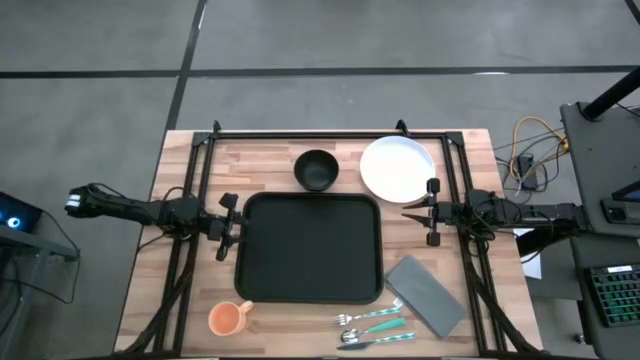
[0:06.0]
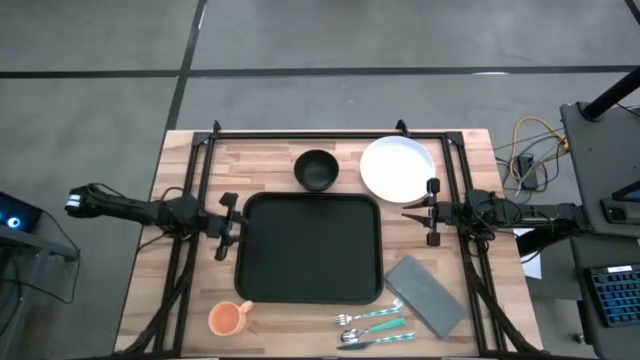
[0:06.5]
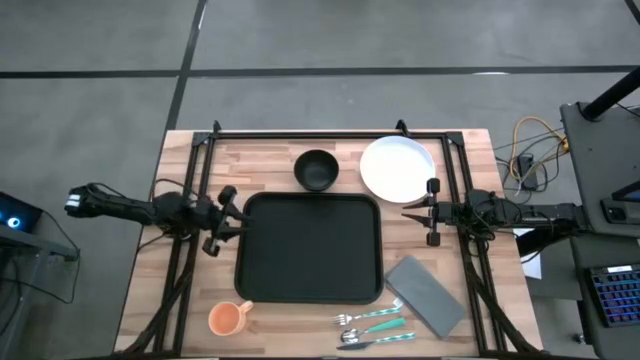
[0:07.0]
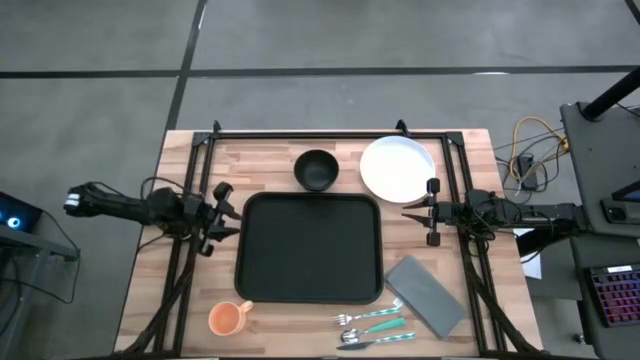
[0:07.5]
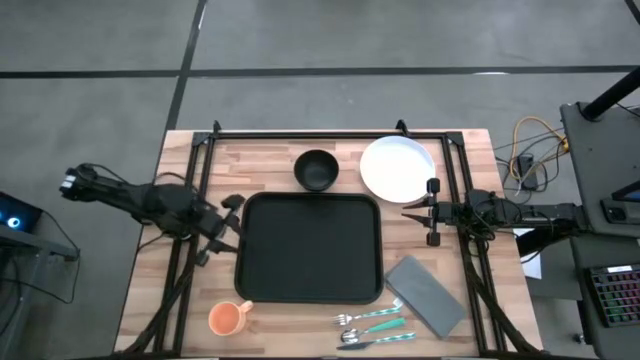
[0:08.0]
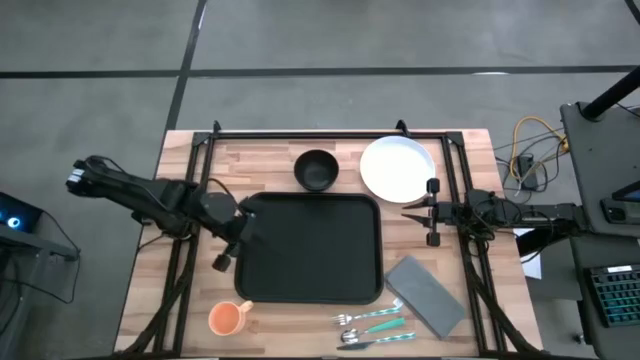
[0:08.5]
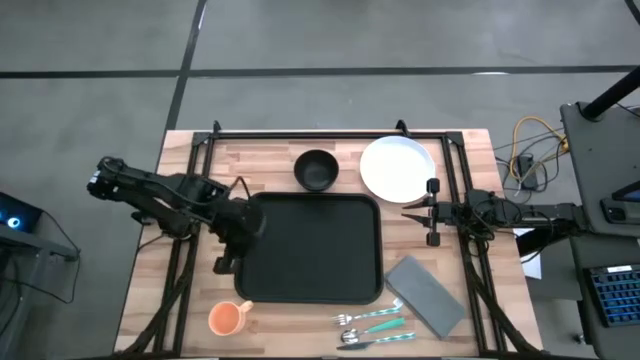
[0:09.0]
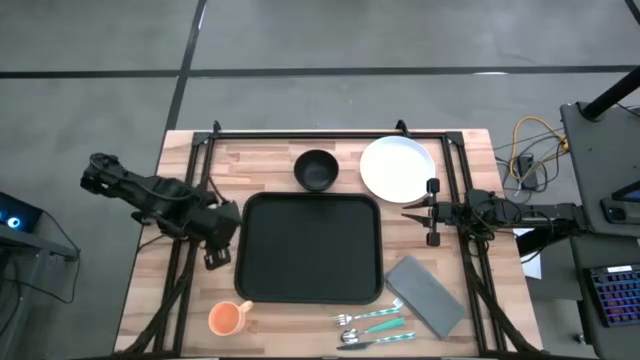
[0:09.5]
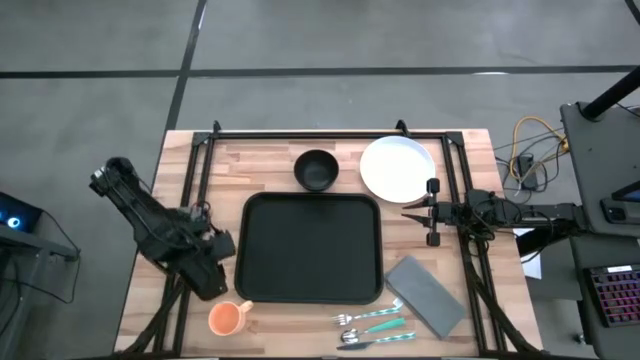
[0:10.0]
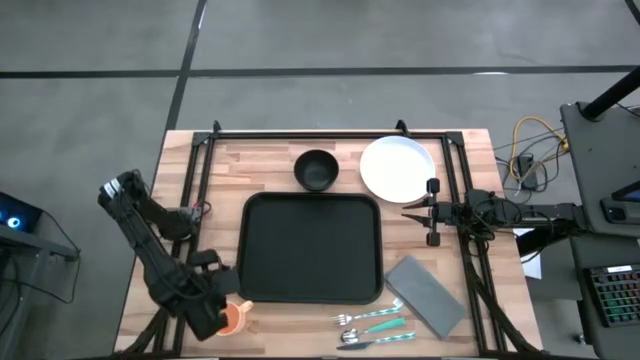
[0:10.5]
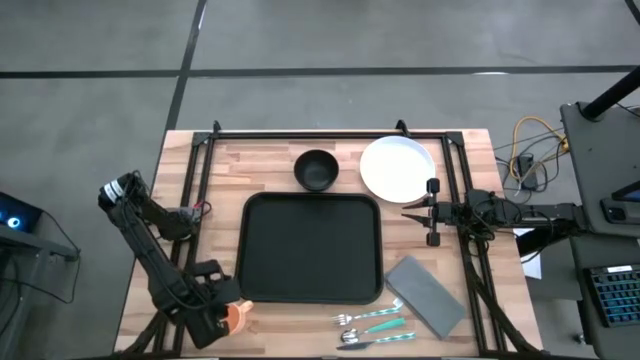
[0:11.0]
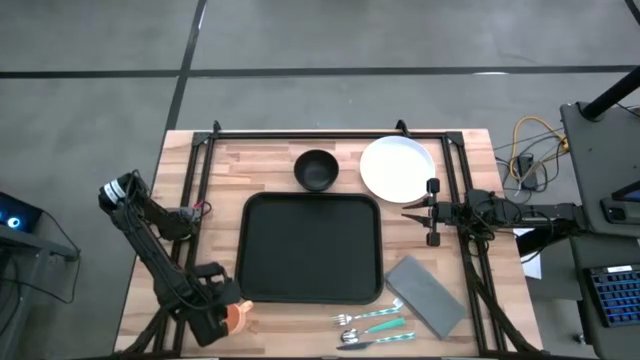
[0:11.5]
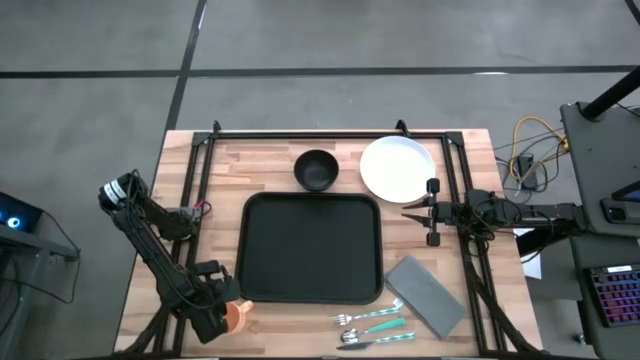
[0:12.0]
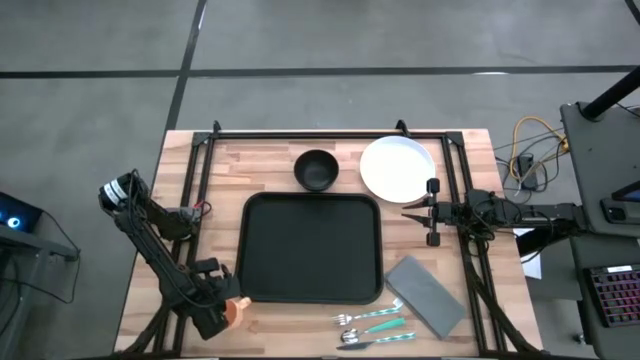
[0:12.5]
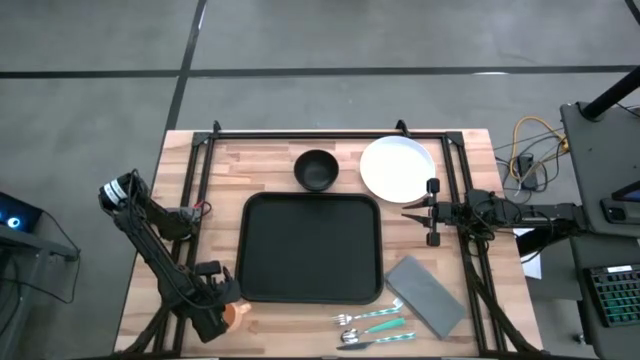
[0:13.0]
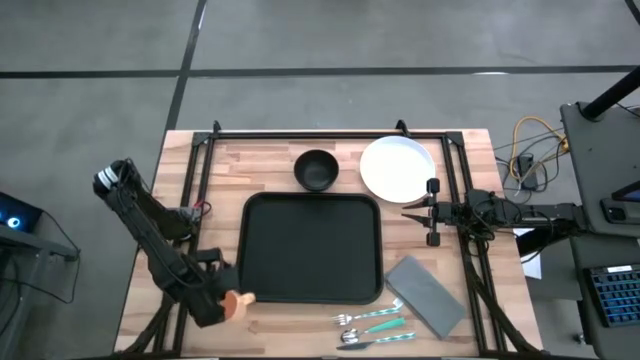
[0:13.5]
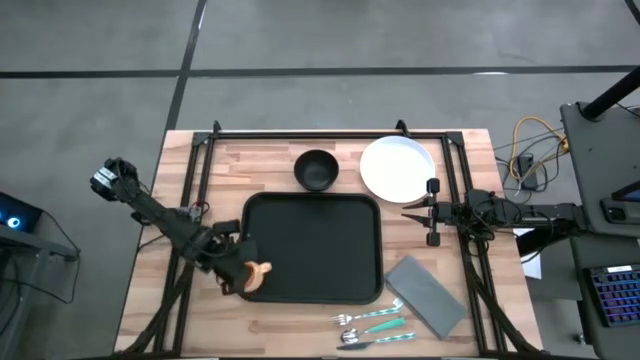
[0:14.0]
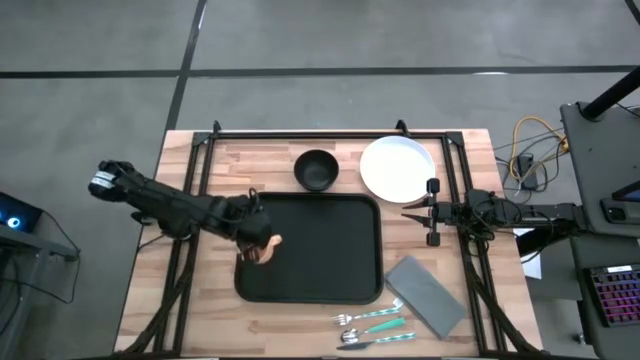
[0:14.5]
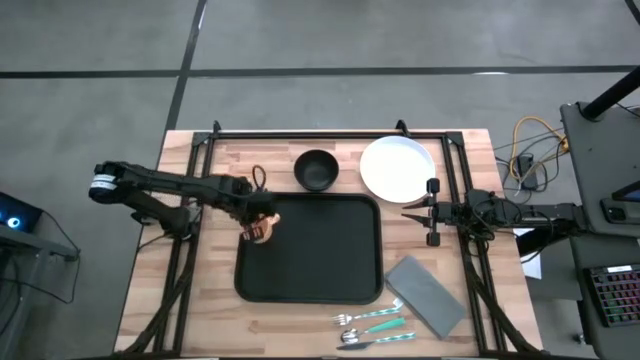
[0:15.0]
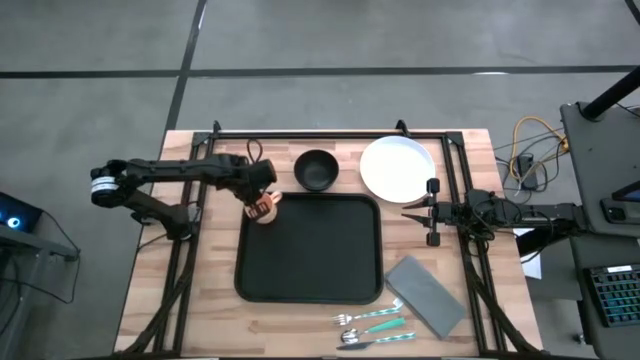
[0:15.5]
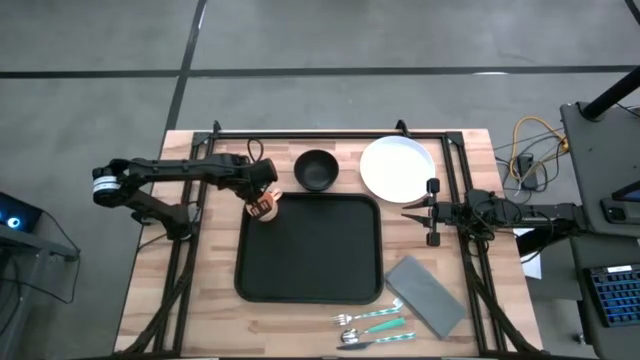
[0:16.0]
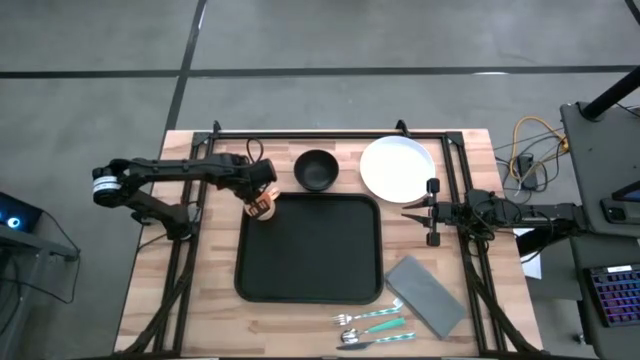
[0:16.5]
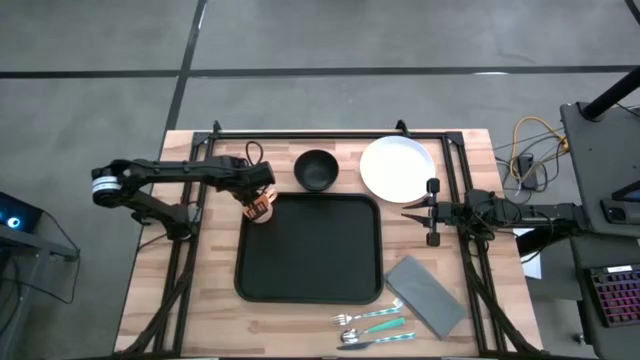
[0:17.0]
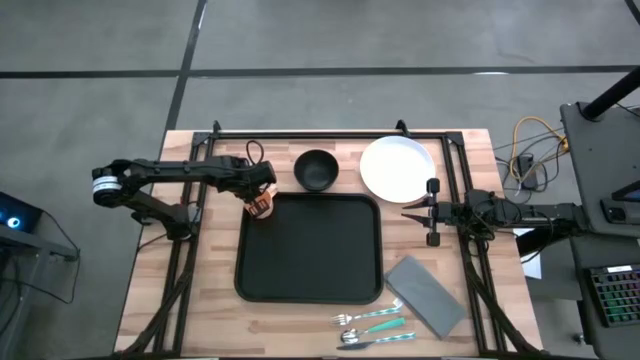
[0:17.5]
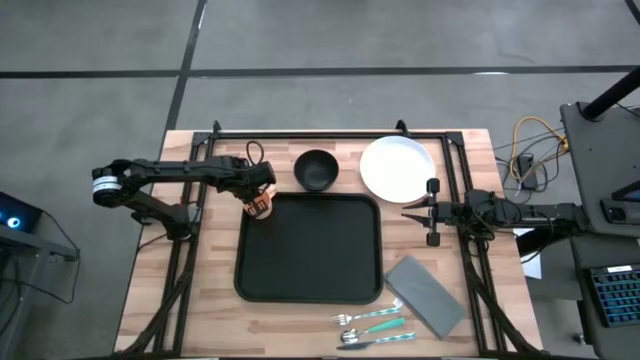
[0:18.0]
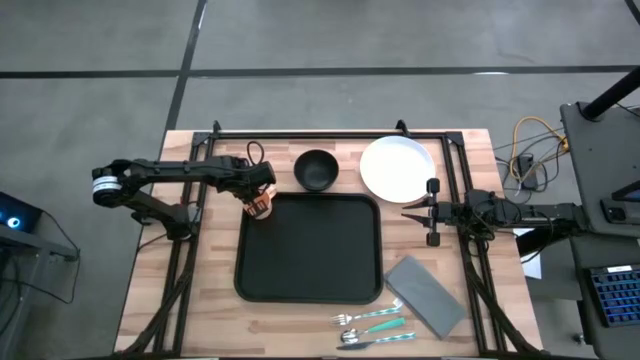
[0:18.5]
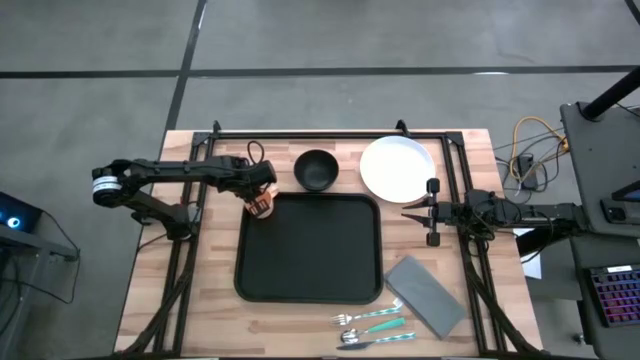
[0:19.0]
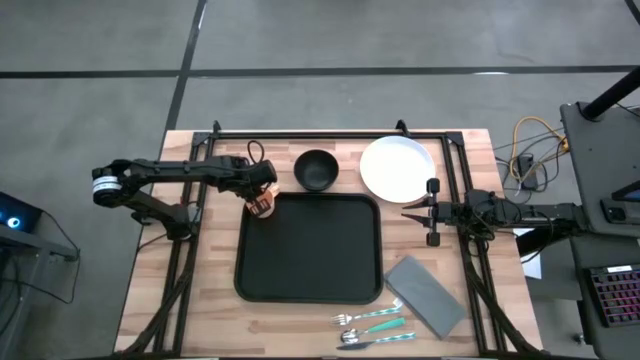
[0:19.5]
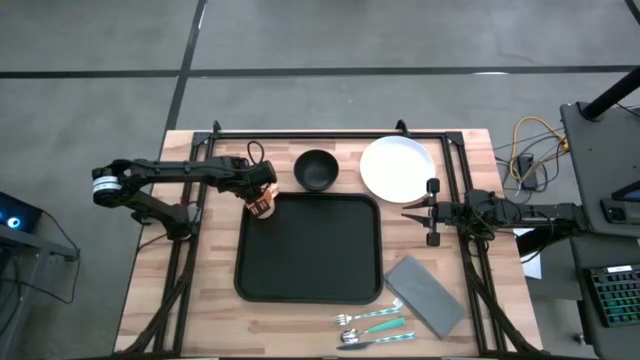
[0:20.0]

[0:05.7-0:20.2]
Task: Set up tray
Put the orange mug on the top left of the black tray
